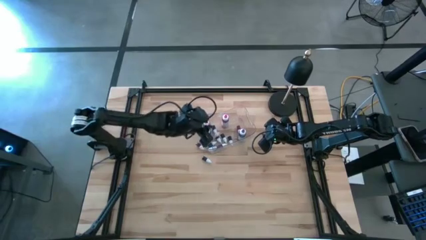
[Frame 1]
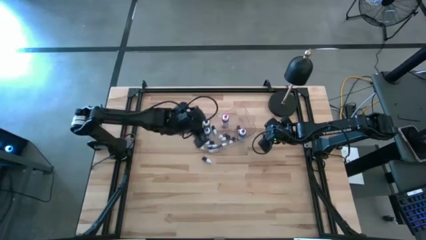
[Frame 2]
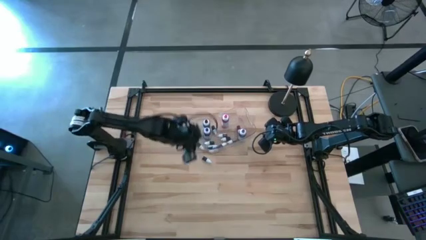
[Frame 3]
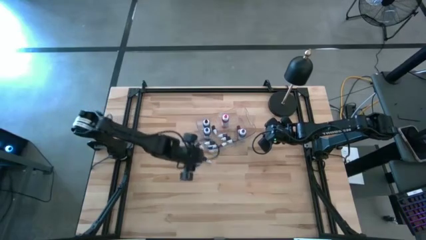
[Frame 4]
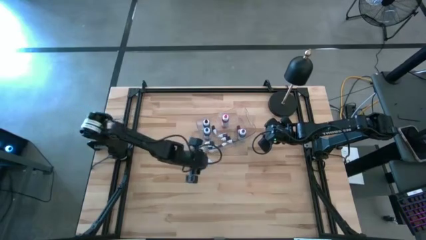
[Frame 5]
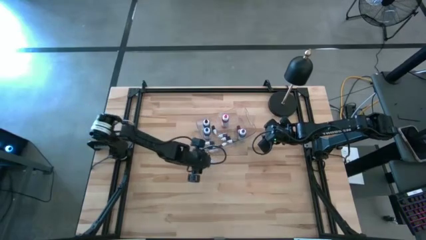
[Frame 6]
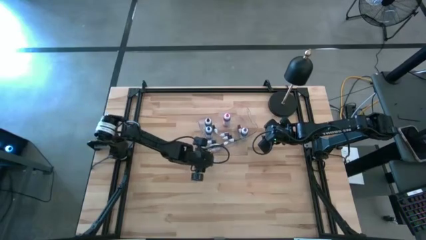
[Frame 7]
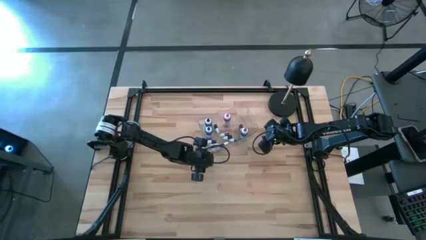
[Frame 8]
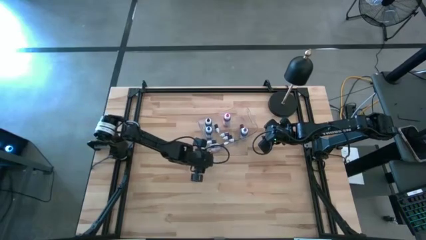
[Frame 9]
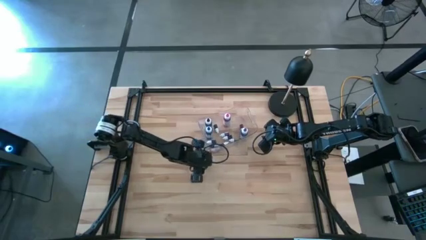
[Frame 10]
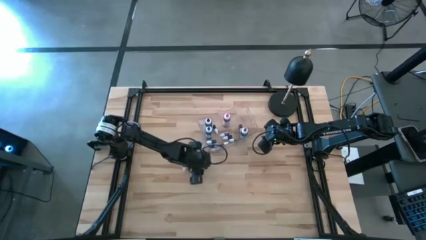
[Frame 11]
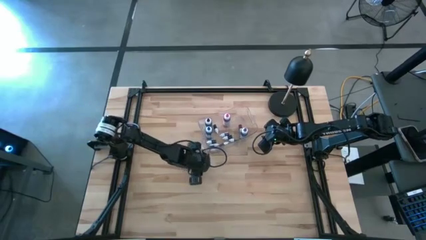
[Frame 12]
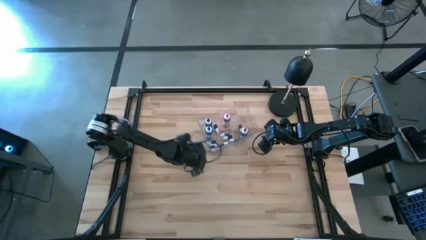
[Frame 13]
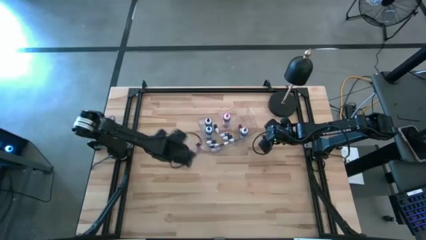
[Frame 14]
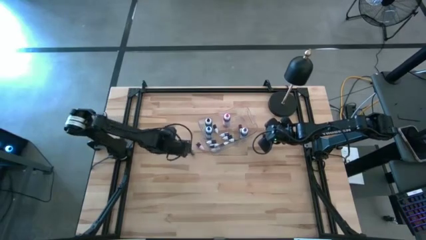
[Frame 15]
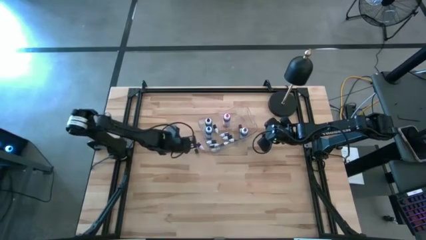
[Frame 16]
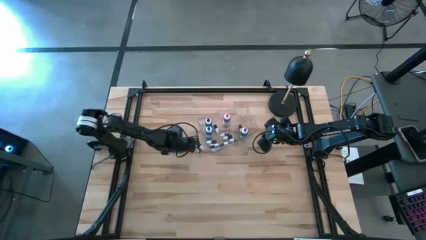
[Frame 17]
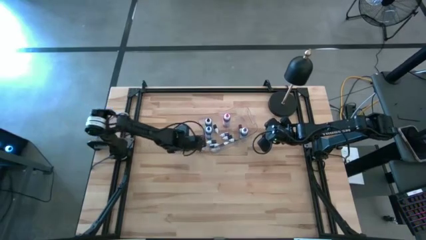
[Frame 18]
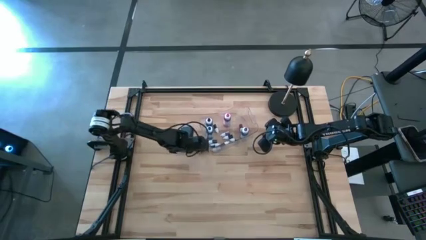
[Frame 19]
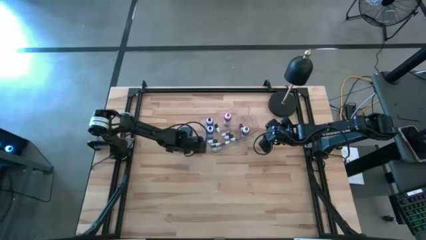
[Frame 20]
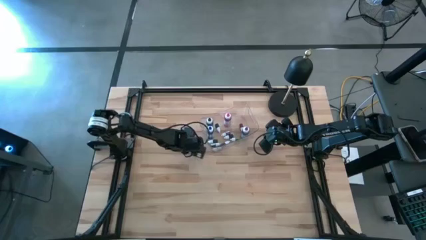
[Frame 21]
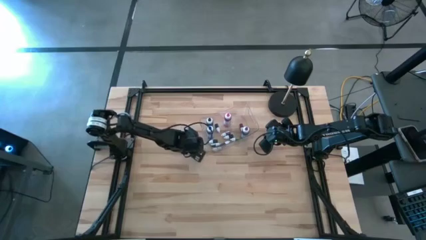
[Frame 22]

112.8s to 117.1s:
Task: Pick & Place food coloring
Put the small green food coloring bottle into the transparent container

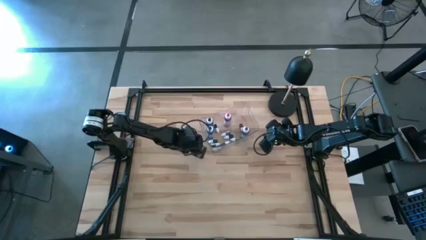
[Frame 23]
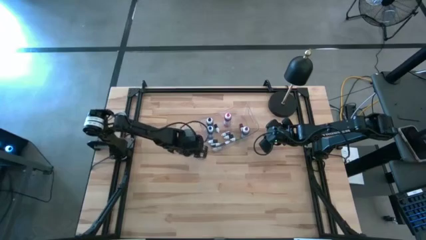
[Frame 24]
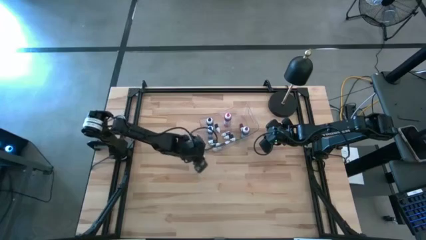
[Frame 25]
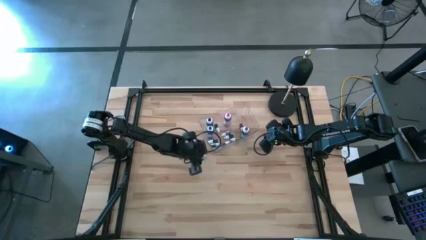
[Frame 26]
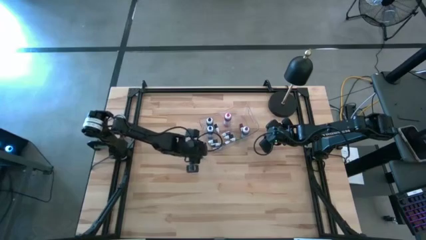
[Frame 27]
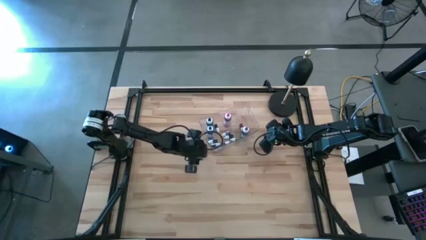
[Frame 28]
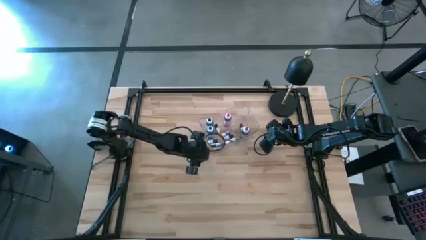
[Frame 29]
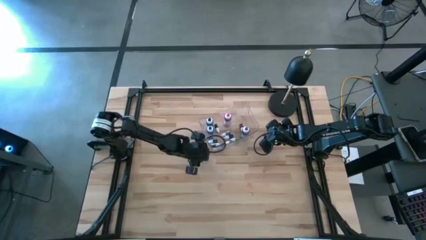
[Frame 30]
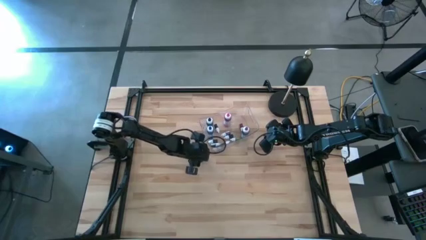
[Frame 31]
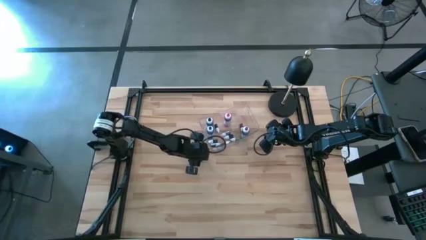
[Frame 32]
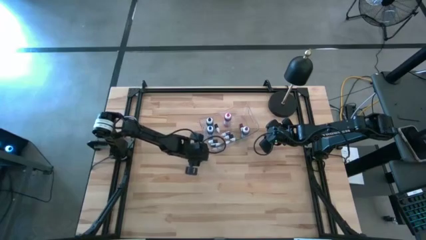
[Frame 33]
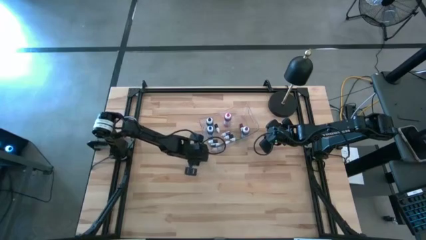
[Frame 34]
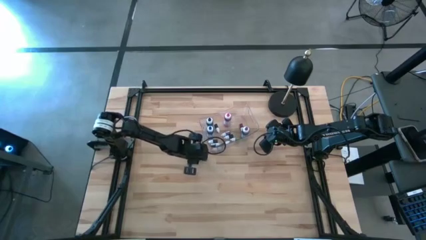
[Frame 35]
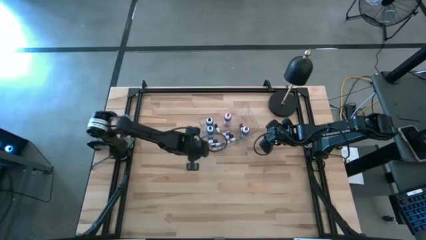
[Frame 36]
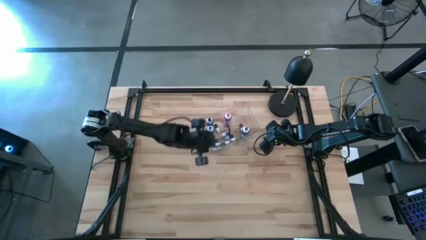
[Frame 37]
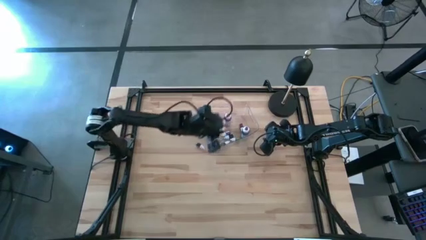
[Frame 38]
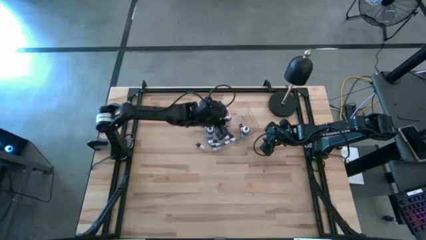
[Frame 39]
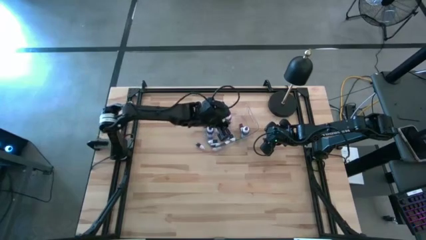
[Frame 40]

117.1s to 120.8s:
Put the small green food coloring bottle into the transparent container

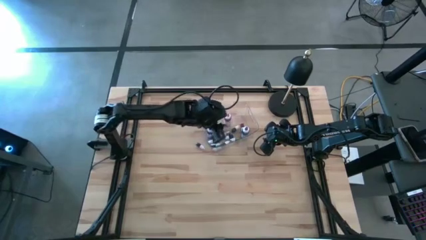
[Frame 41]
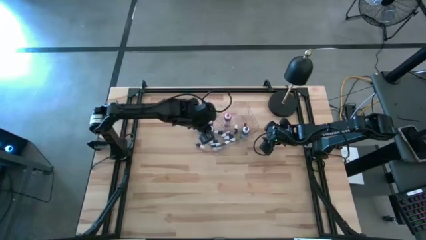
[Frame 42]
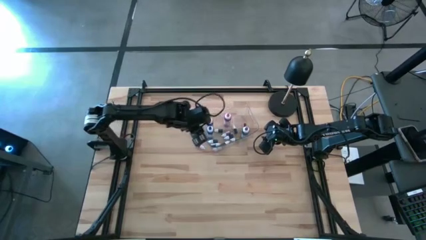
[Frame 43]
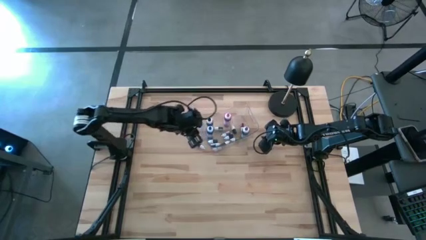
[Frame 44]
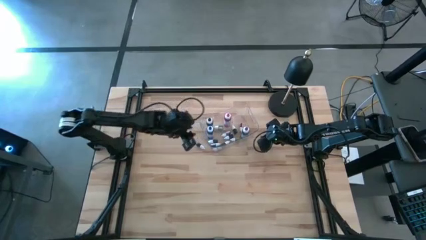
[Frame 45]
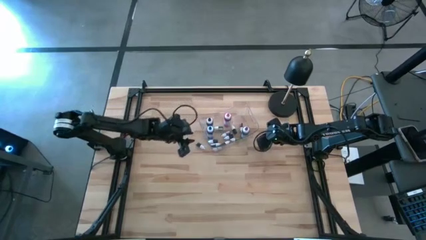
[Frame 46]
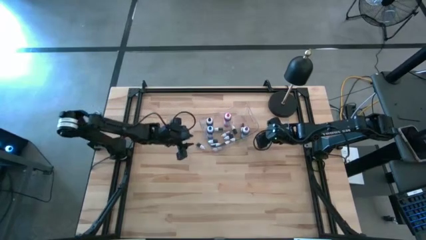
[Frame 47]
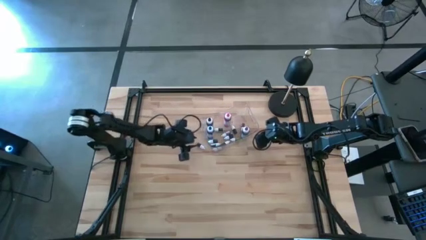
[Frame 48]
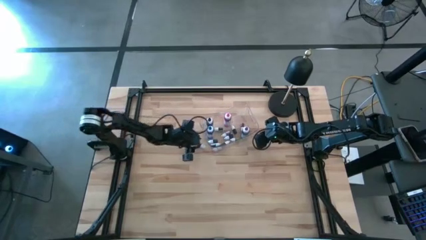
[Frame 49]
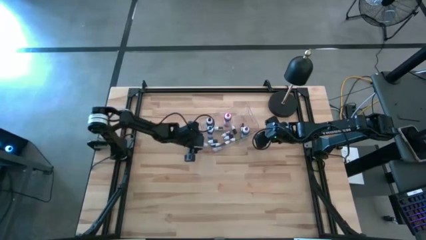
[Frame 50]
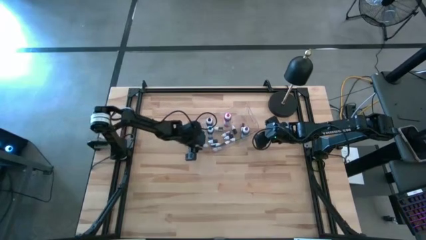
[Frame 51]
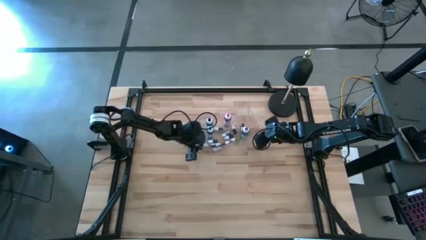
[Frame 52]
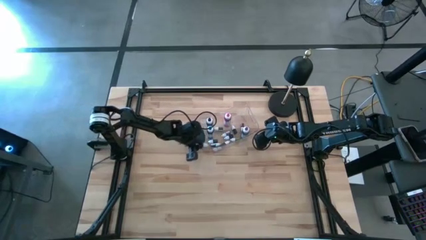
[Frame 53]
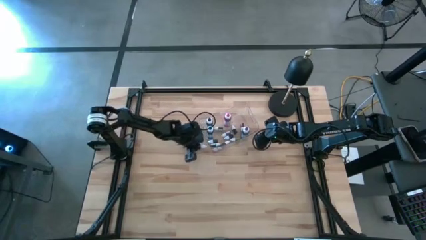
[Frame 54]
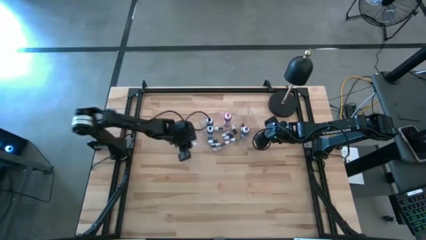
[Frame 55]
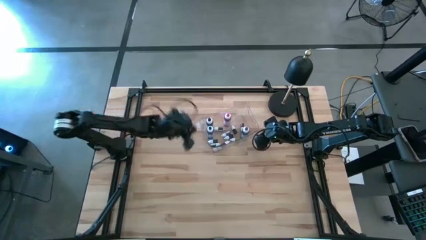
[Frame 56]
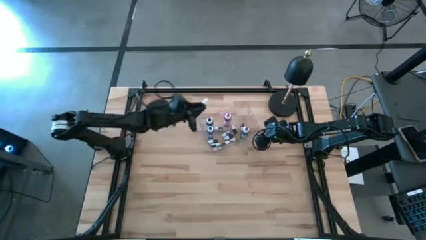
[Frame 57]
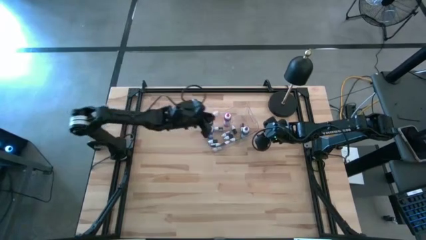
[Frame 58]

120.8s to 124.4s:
Put the small red food coloring bottle into the transparent container

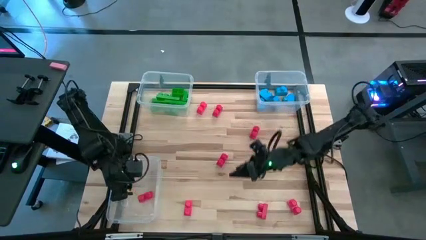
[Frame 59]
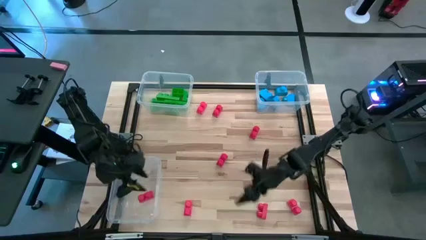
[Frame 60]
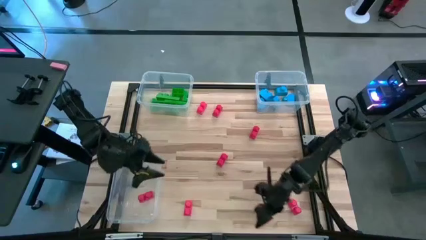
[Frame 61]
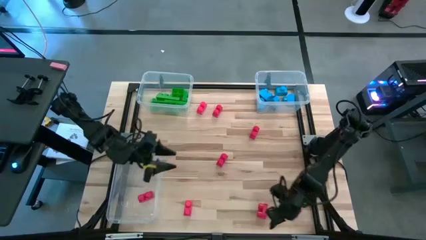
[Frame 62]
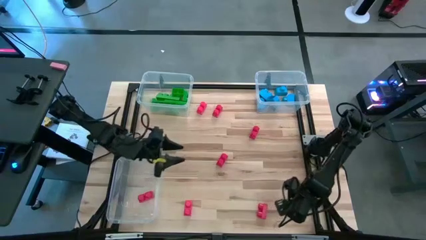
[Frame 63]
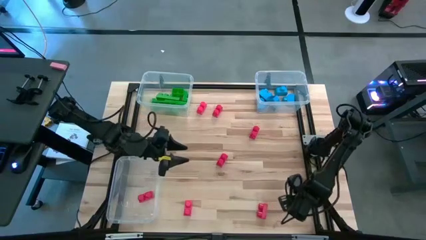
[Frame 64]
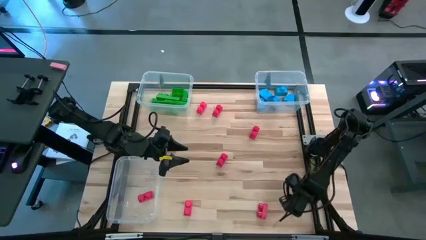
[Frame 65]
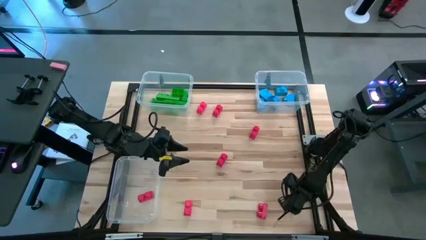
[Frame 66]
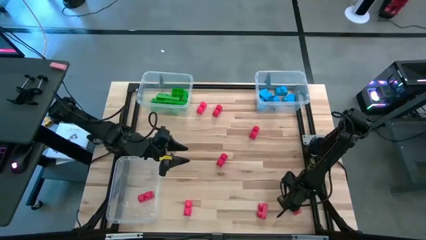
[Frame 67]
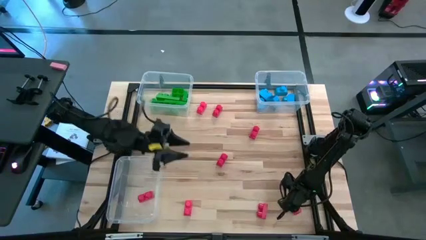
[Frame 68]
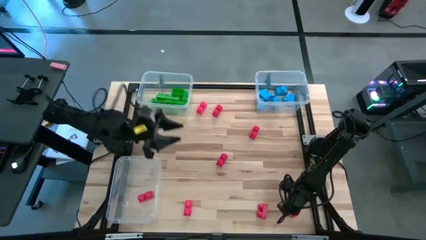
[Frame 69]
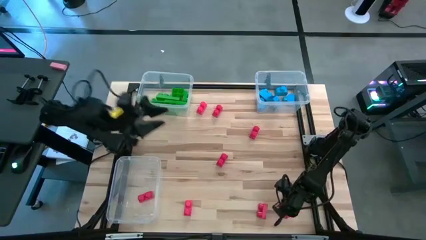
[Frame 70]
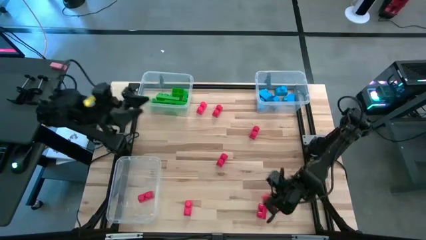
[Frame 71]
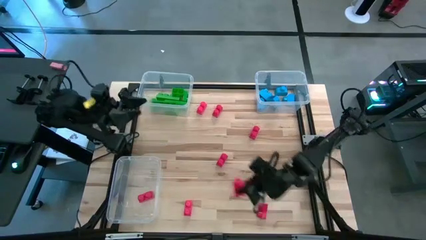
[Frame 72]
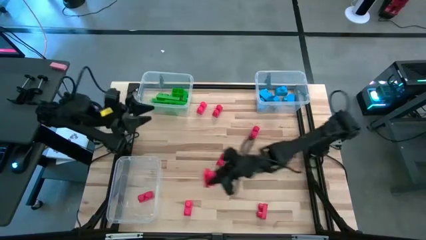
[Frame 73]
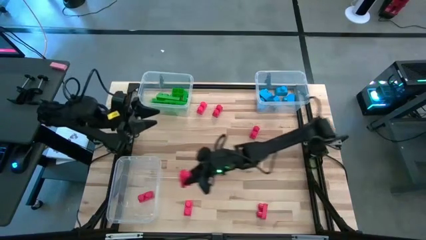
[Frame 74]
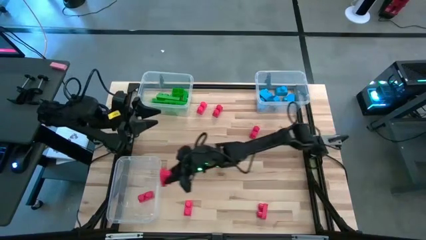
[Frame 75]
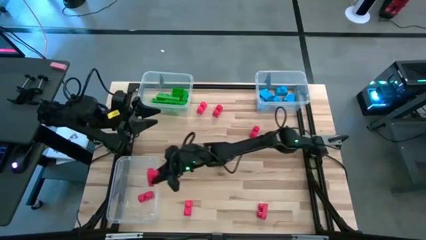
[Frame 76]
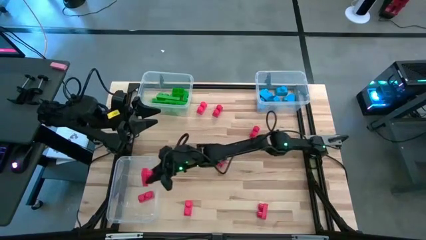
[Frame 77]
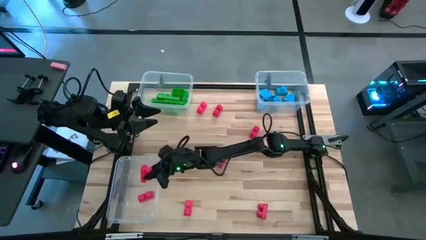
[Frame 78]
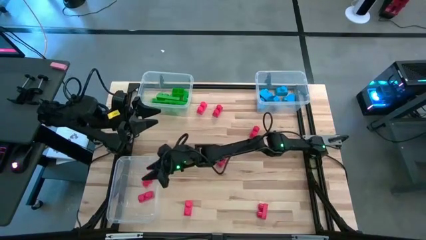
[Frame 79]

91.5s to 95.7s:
Task: Sort blocks
Put the red game piece into the bottom left transparent bin
